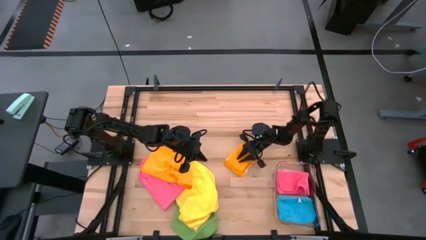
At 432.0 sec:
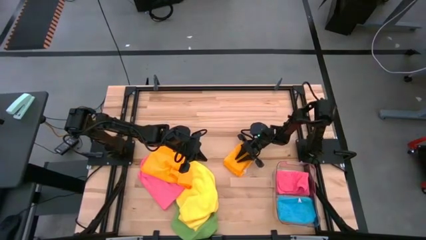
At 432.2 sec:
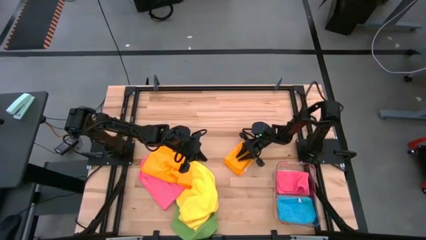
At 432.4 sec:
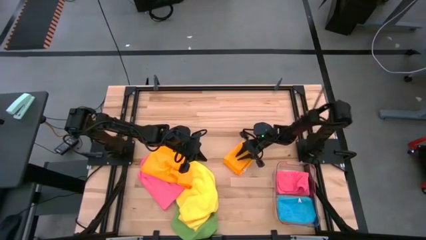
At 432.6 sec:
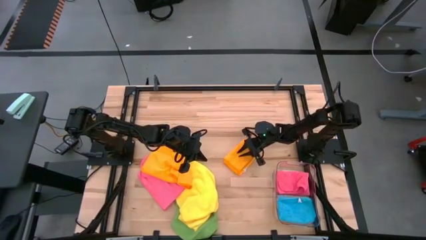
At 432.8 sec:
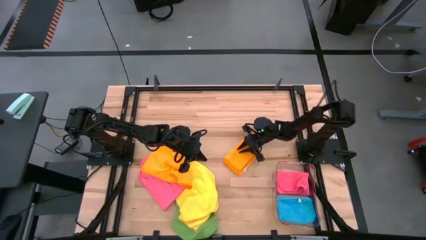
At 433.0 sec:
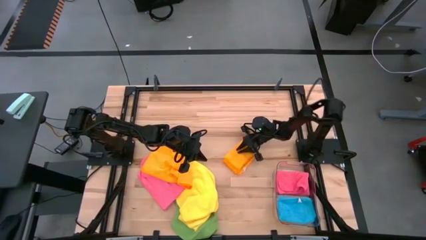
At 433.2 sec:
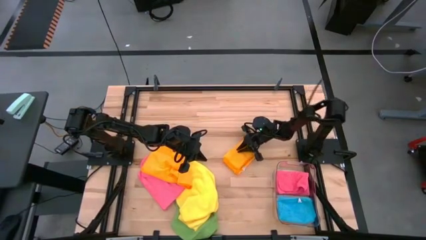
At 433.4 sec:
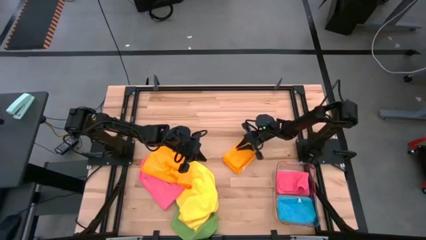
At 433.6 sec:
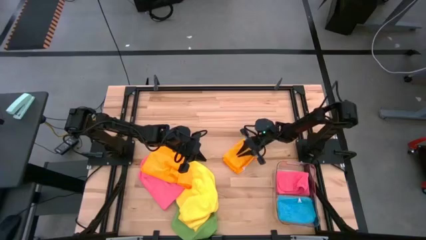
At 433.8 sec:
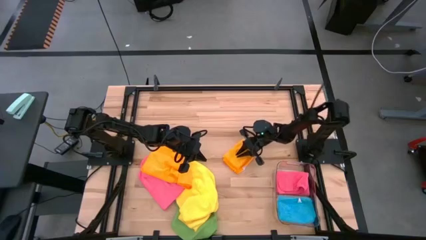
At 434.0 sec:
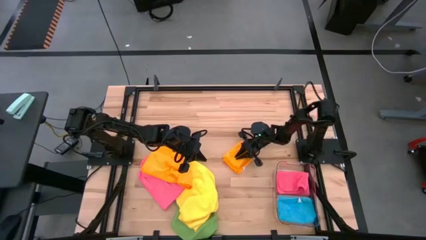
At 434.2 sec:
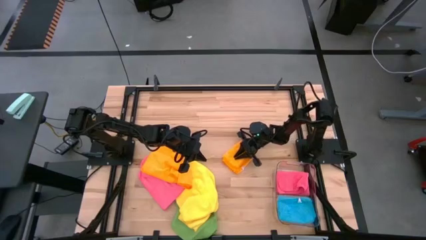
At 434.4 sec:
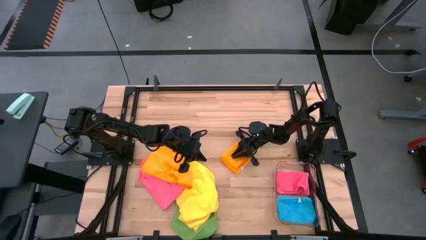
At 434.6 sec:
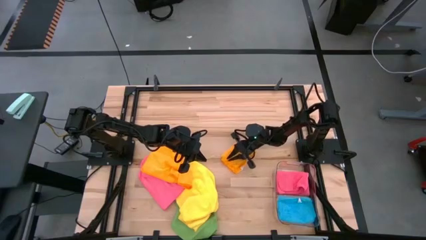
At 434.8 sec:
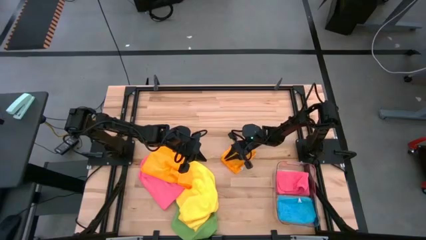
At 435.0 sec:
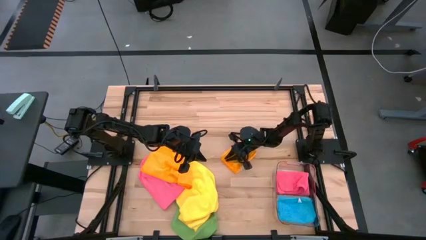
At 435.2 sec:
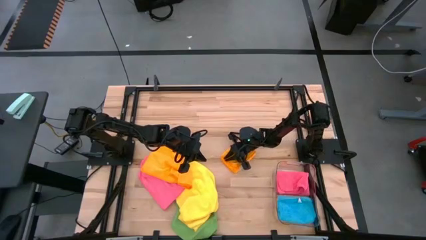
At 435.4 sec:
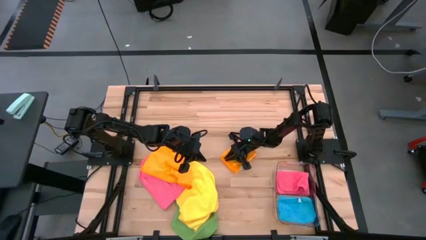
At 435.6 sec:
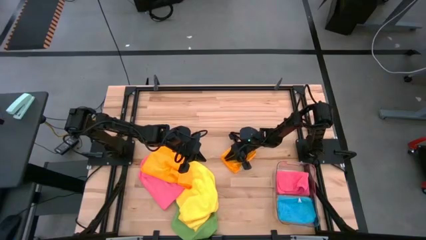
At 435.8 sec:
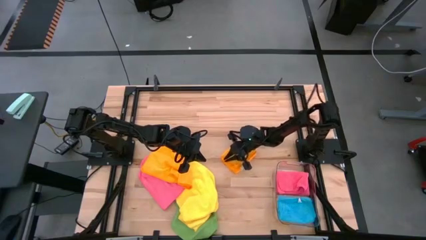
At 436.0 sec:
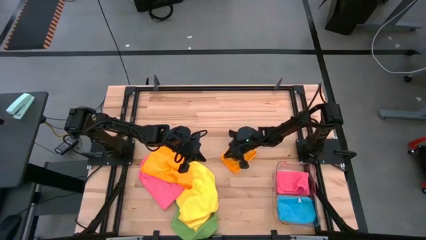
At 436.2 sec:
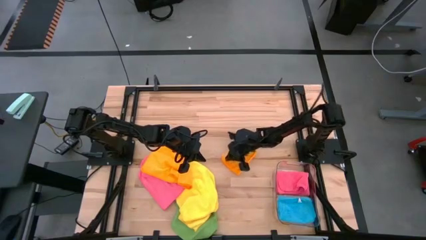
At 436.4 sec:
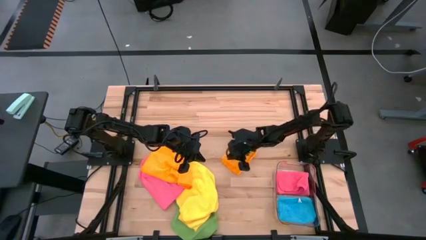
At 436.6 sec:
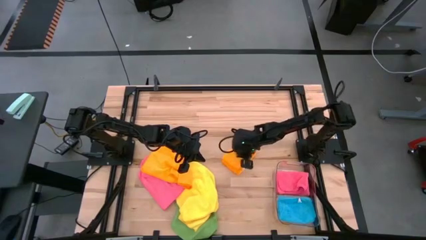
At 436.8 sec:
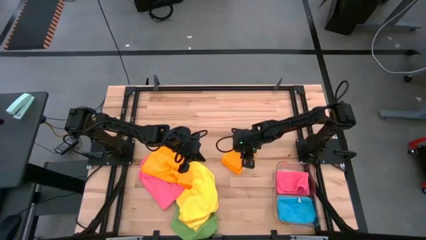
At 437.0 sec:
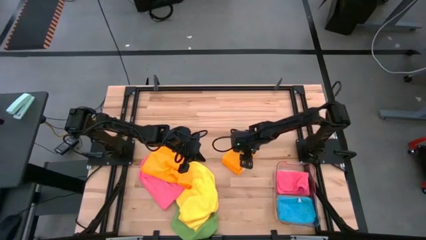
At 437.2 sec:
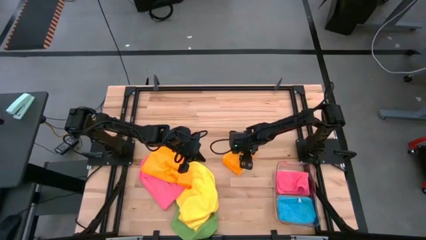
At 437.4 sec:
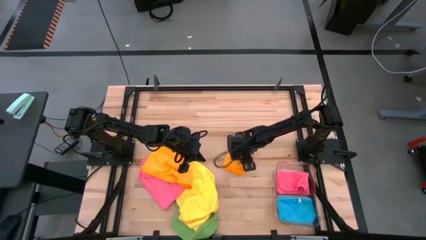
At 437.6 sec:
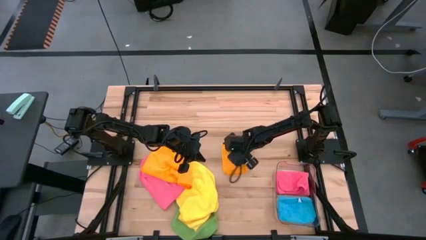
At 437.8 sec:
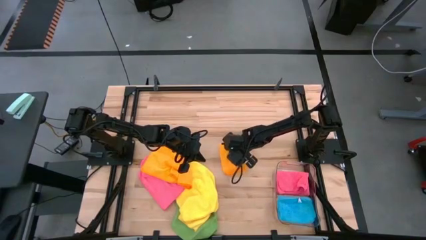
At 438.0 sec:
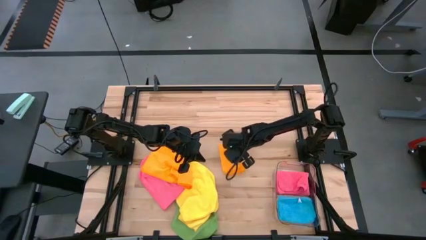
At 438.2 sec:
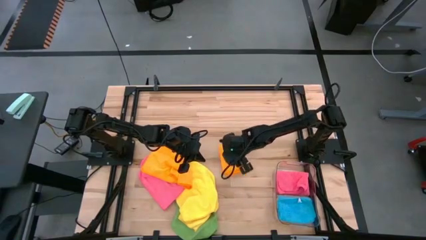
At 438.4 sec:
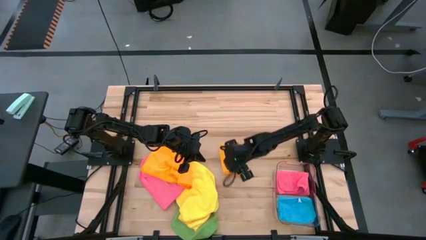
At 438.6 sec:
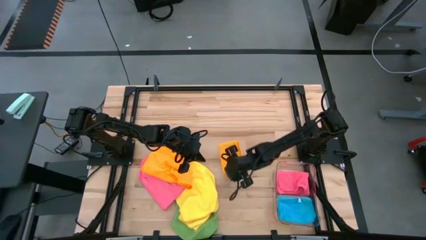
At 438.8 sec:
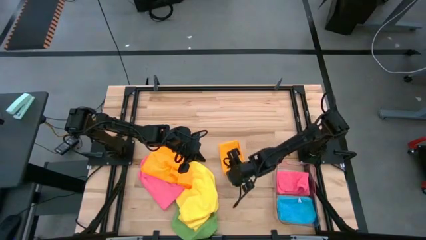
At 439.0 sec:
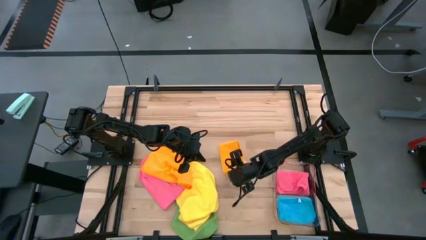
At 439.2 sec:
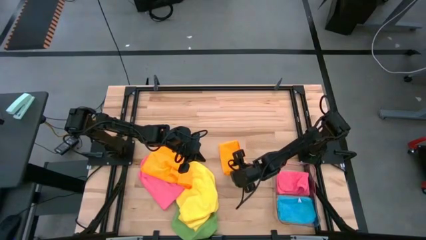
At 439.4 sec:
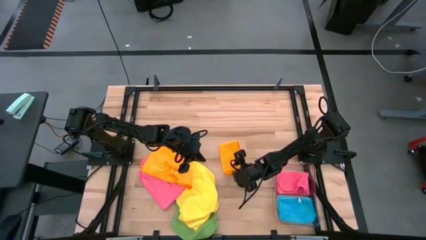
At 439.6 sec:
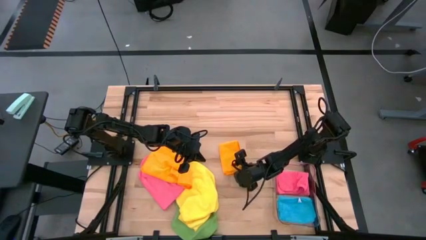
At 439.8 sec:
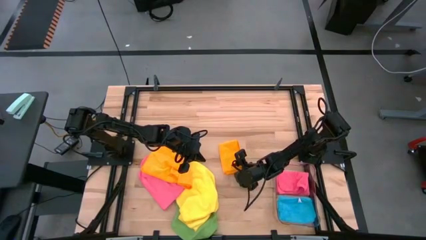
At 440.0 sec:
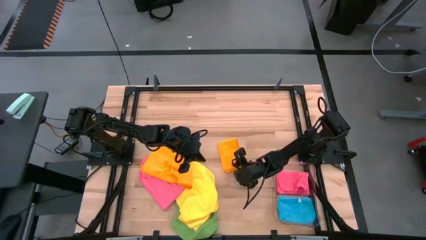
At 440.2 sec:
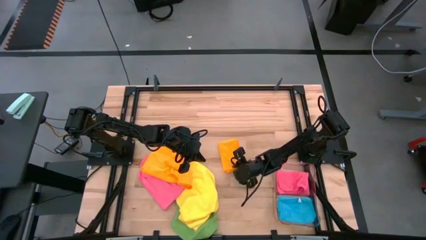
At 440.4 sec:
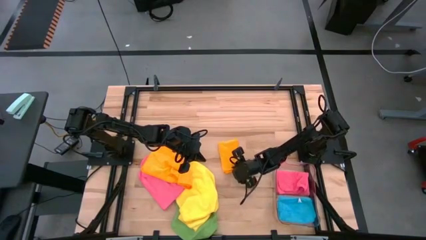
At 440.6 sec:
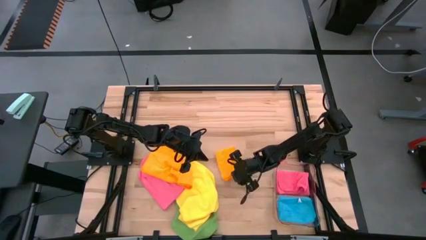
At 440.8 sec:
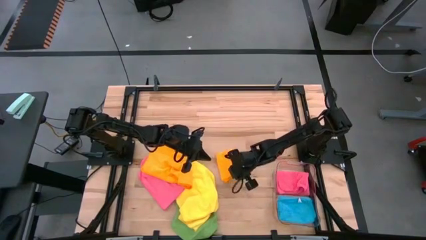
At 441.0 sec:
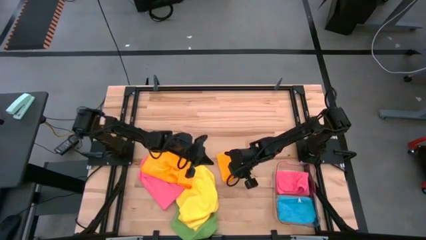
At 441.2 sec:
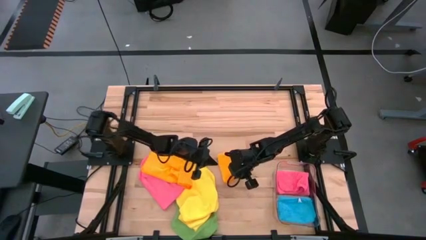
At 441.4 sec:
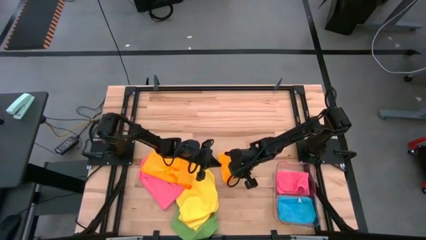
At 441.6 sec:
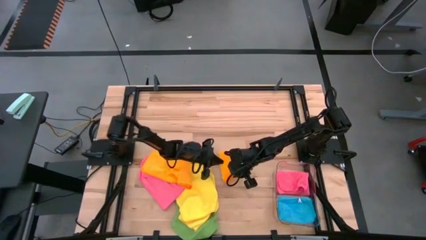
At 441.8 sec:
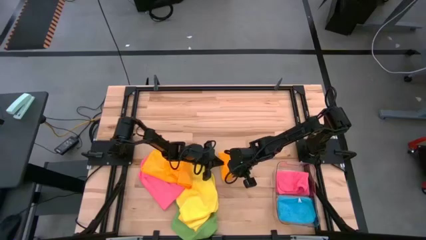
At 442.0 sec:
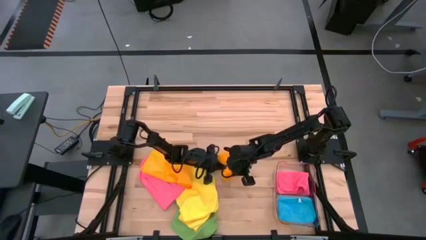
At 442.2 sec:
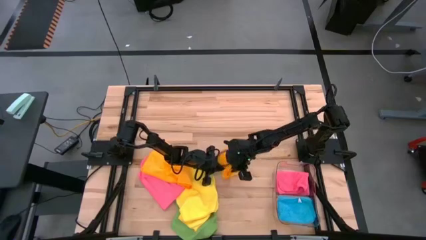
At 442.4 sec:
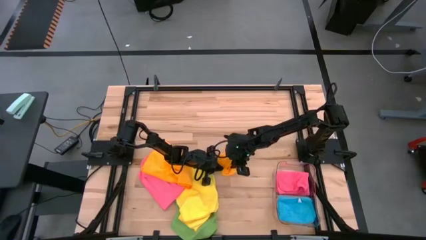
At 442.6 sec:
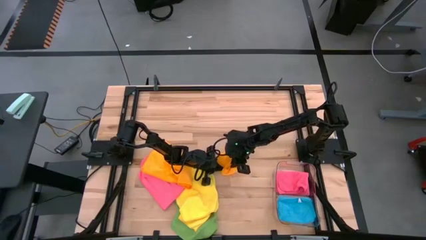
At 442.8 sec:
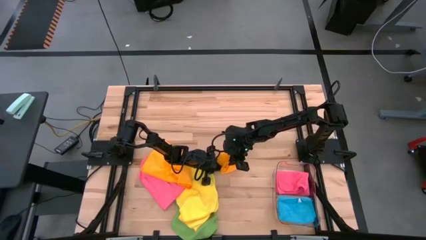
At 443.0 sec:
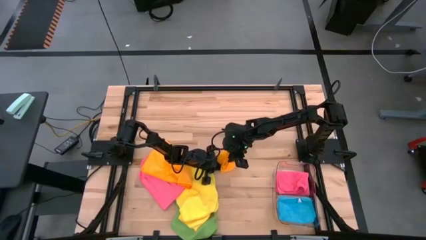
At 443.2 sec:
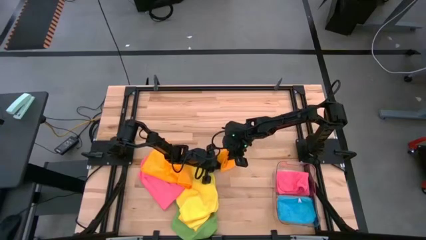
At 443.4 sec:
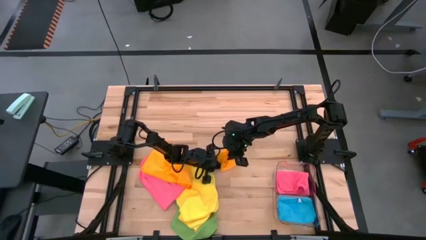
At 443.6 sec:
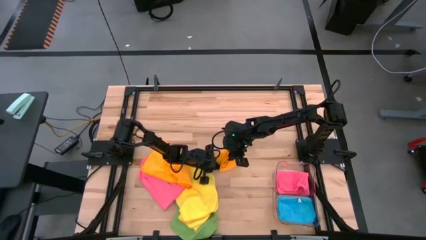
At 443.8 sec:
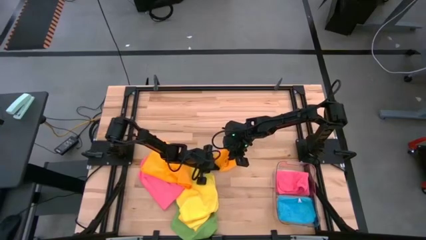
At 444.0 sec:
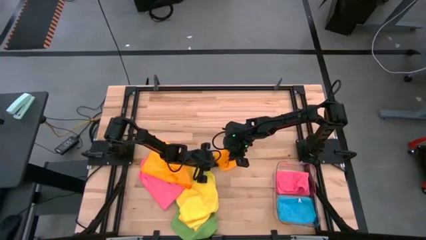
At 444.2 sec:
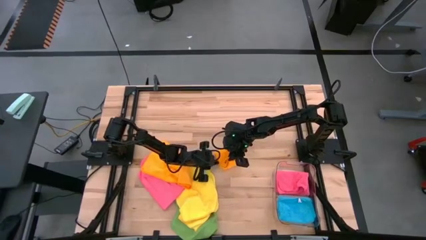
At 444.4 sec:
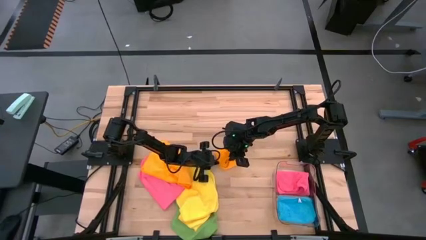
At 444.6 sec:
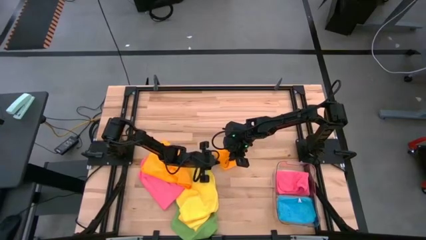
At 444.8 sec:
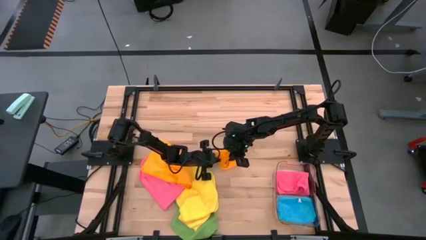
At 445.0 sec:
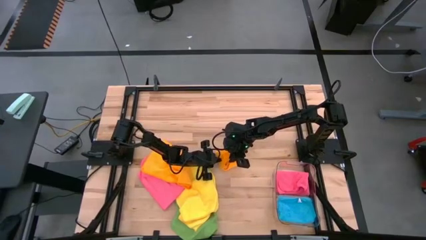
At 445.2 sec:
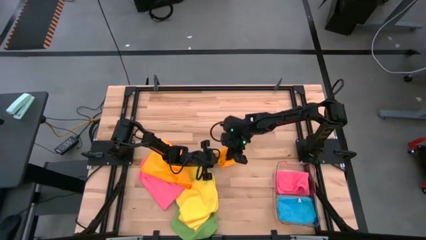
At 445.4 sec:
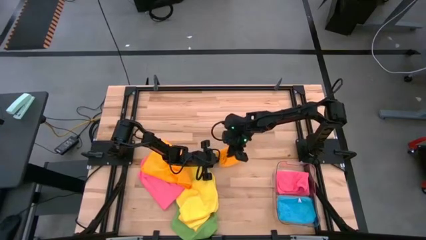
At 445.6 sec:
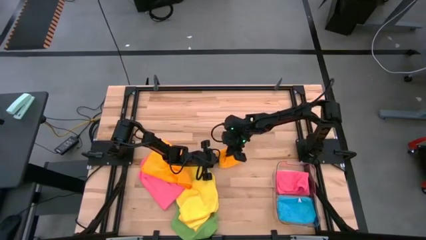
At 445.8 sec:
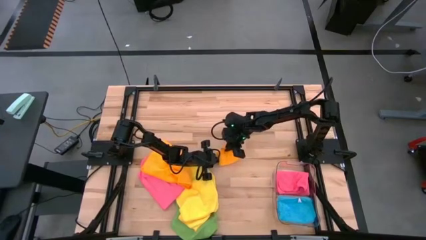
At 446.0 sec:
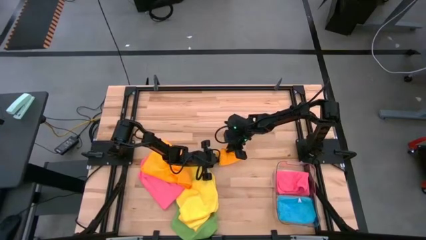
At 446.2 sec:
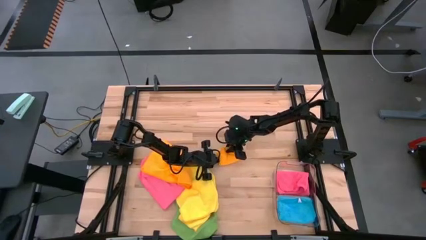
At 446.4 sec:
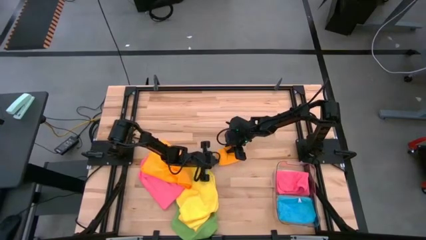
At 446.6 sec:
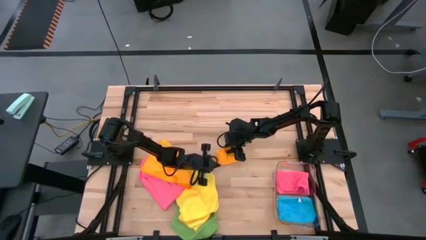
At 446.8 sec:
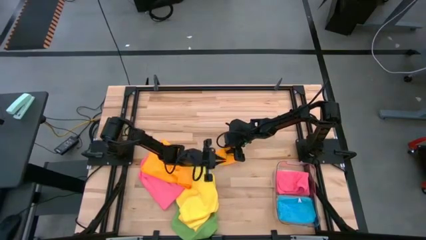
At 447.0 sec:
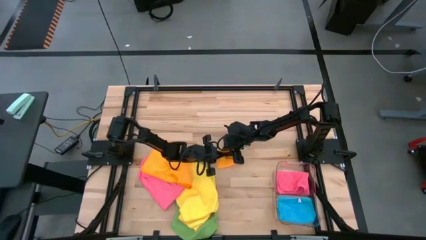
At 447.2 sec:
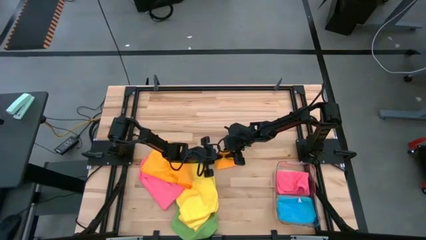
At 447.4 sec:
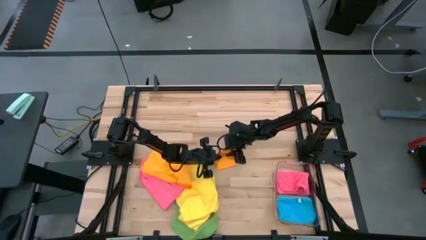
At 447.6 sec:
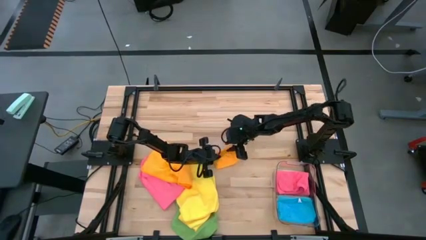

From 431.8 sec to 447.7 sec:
Task: Fold microfiber towels
Fold the orange towel
